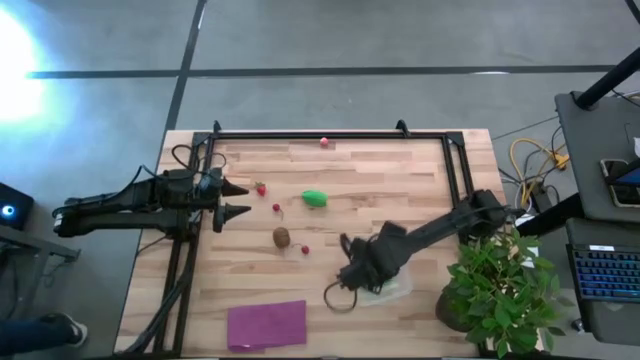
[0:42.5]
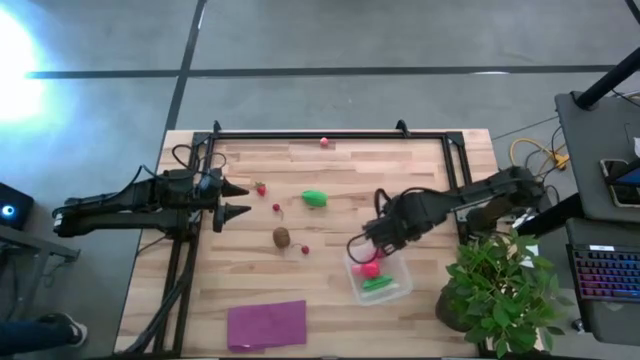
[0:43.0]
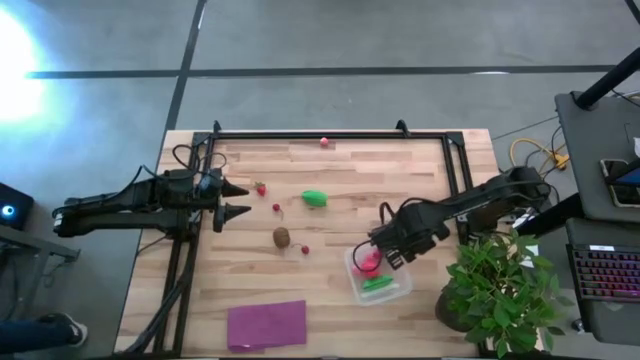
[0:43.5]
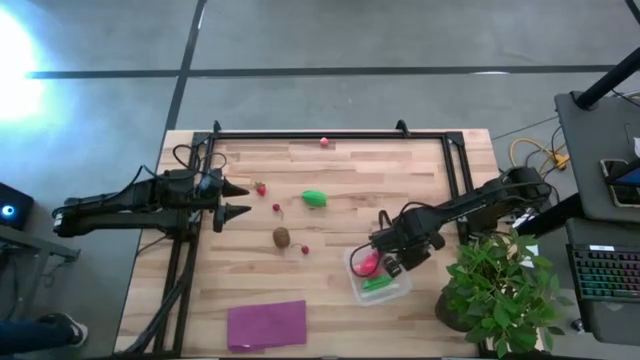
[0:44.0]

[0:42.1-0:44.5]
Task: Pick and placing Produce into tupperware
Adjust the transparent container on the table

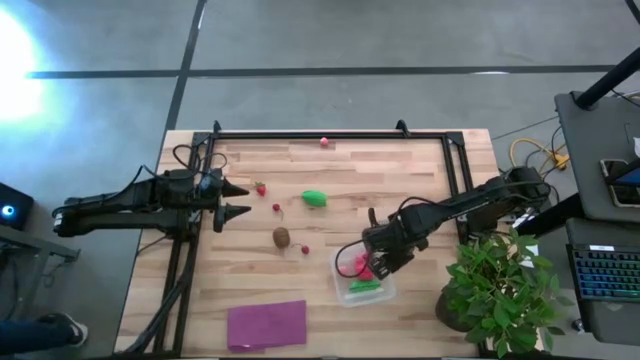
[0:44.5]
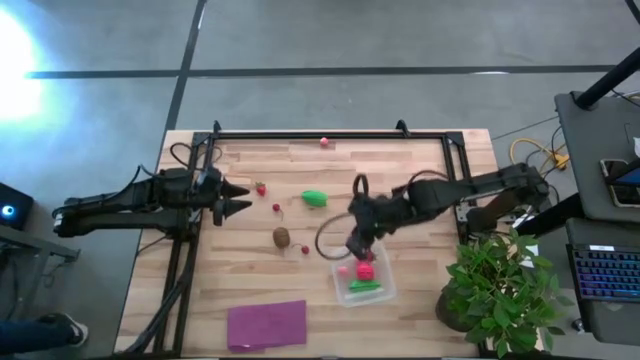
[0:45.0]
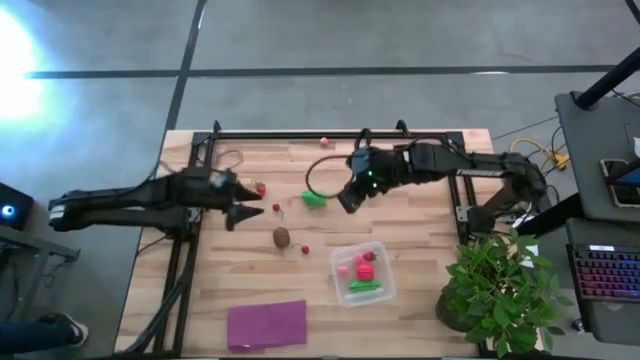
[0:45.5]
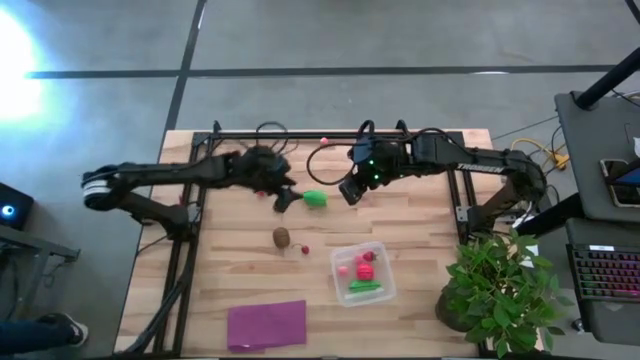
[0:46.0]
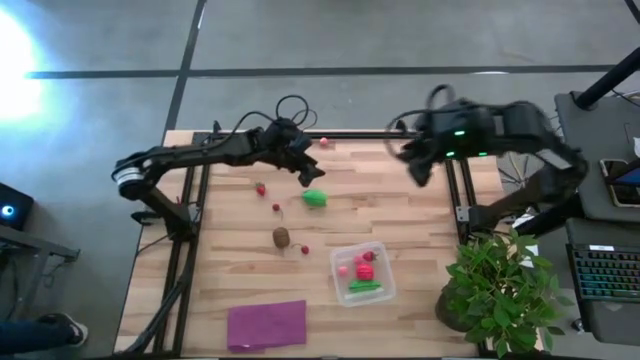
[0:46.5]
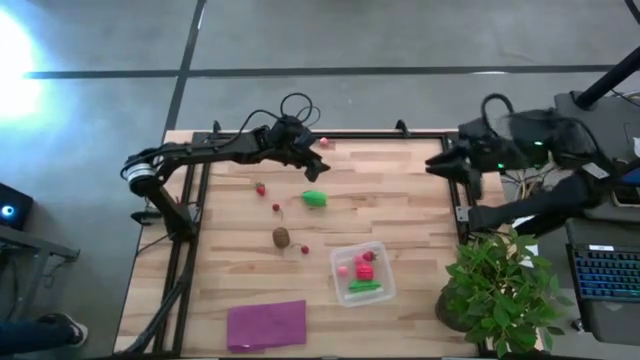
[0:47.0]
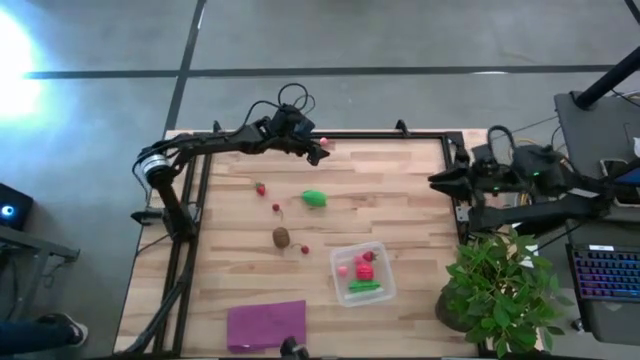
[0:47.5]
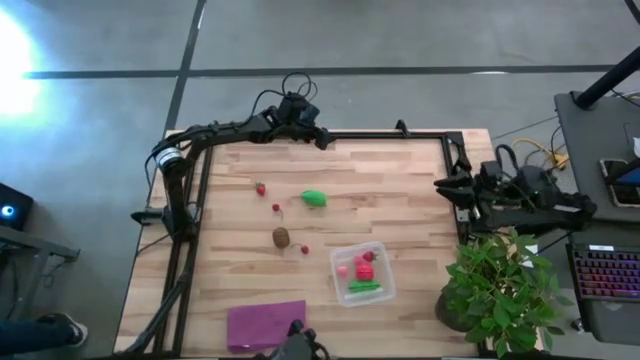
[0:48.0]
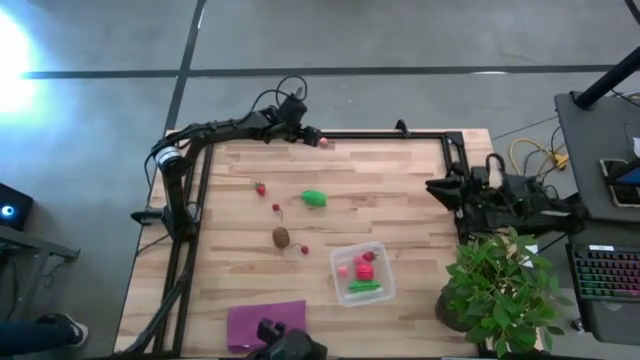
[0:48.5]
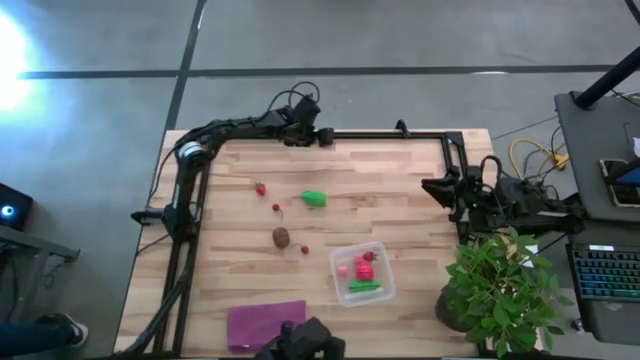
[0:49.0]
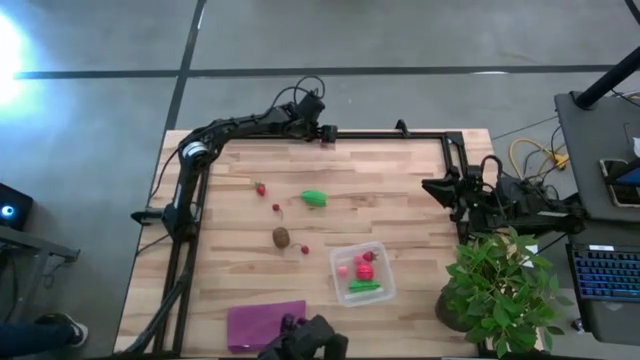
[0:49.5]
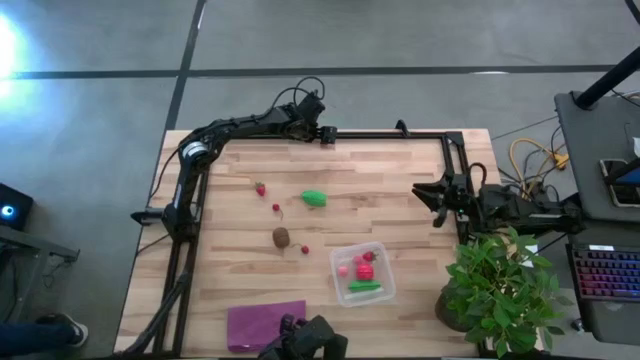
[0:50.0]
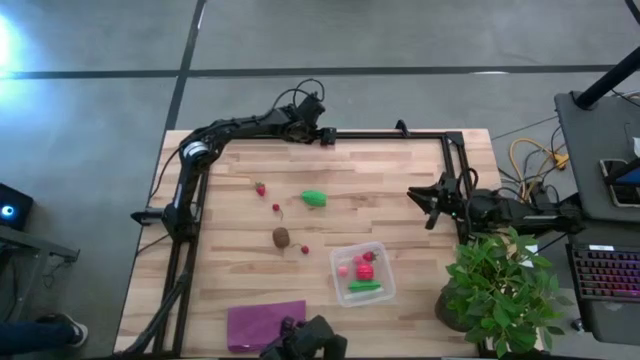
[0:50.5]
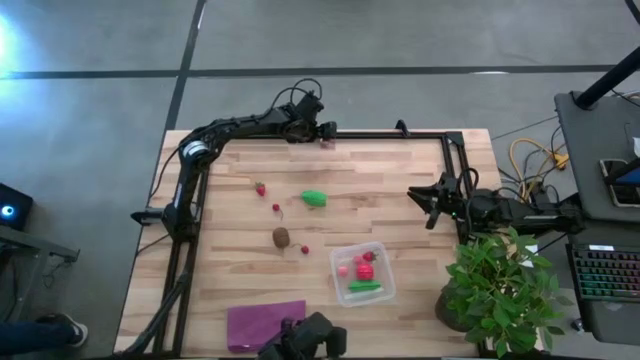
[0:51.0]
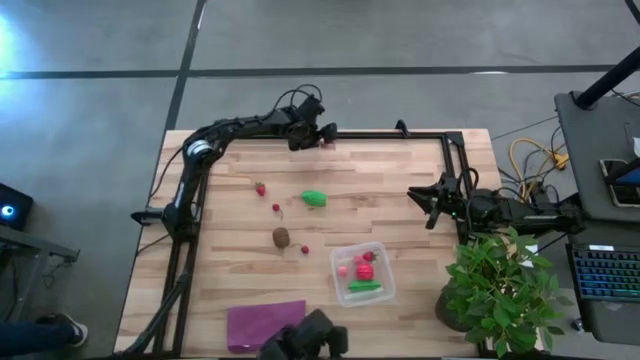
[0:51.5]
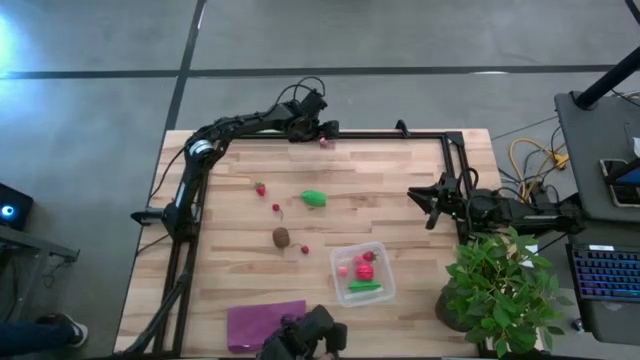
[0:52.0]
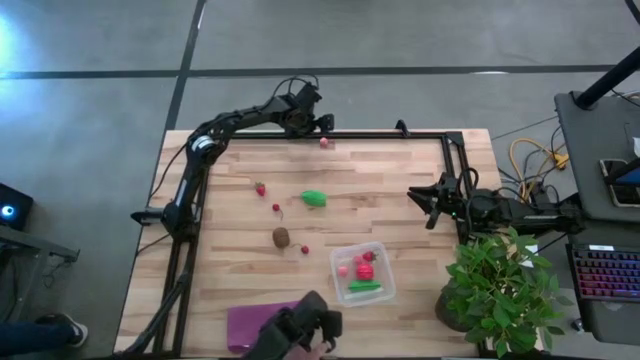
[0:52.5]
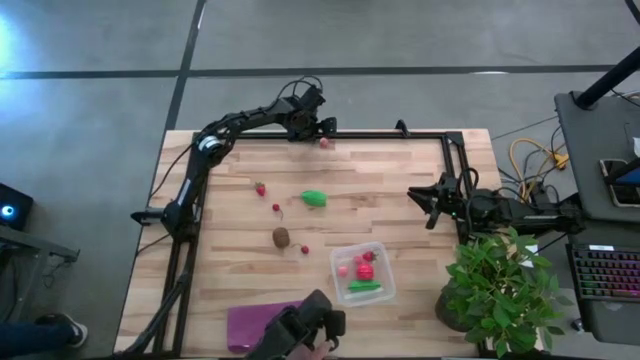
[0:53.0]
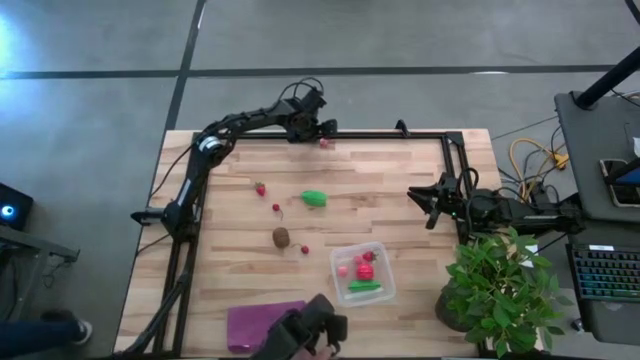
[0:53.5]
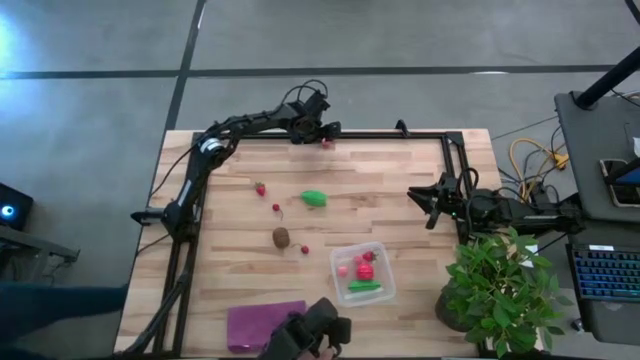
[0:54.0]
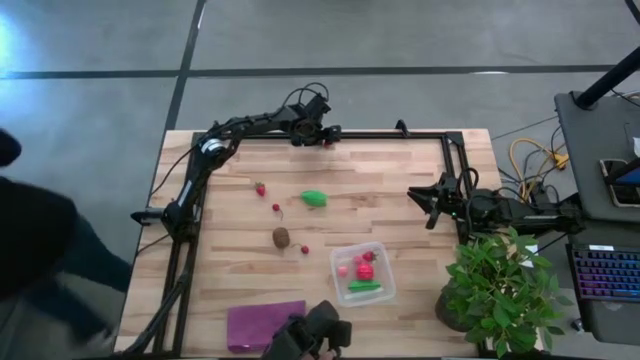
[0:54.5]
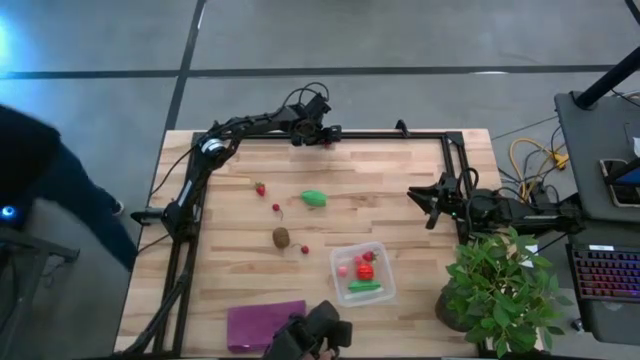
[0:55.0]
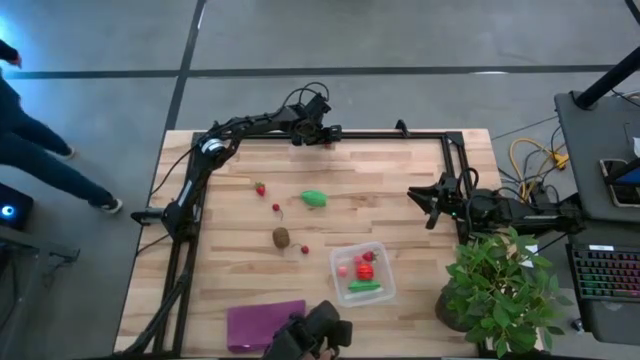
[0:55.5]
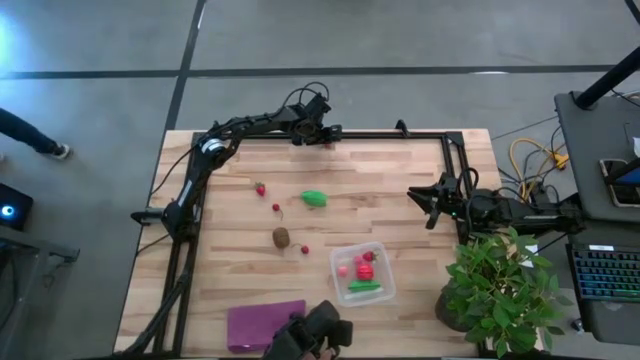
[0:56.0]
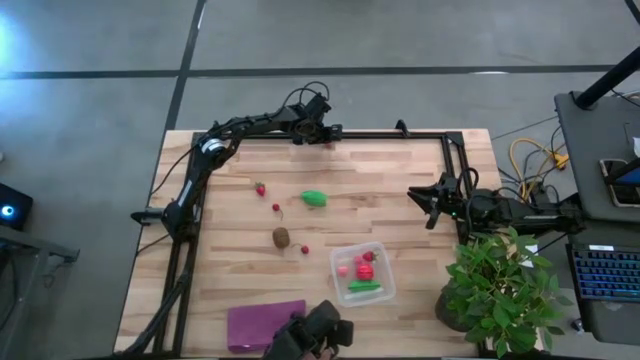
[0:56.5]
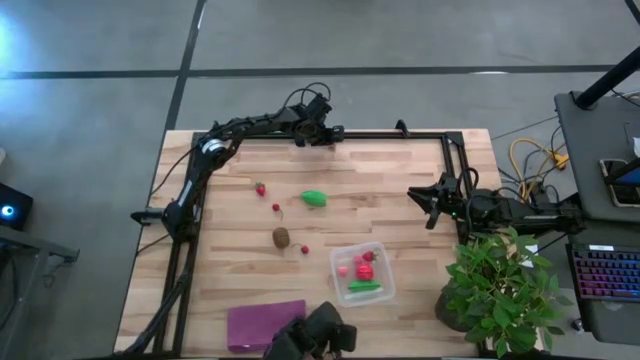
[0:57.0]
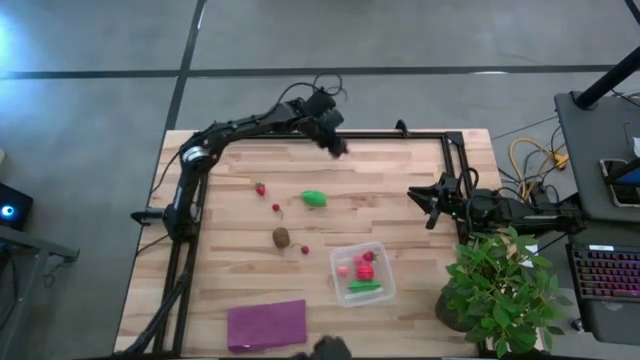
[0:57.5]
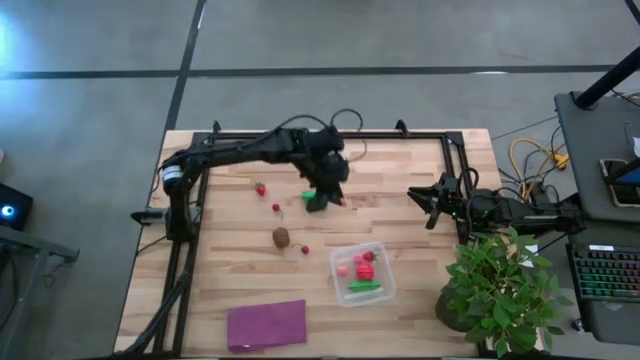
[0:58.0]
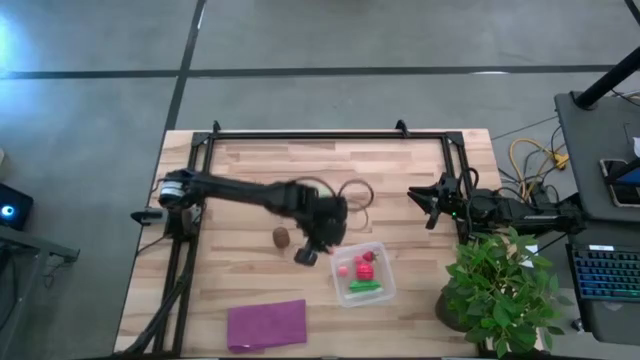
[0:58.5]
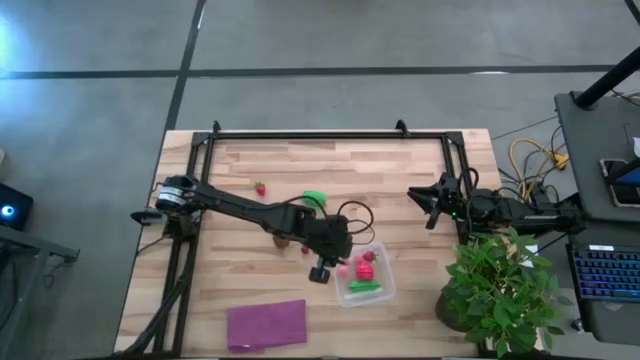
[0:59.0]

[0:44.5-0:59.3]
Put the pink peach into the transparent container

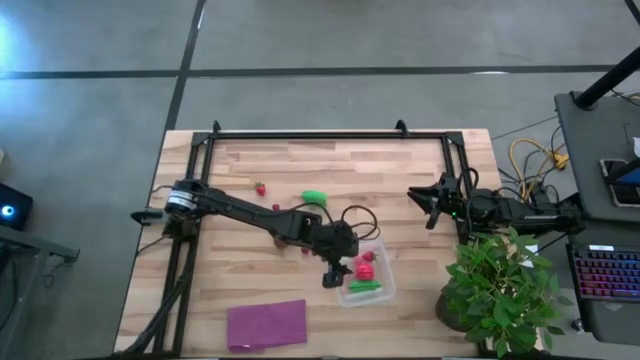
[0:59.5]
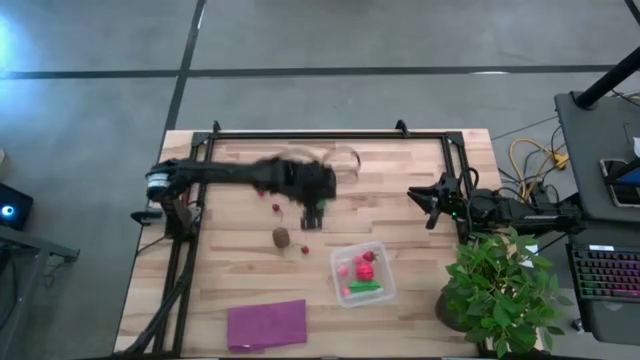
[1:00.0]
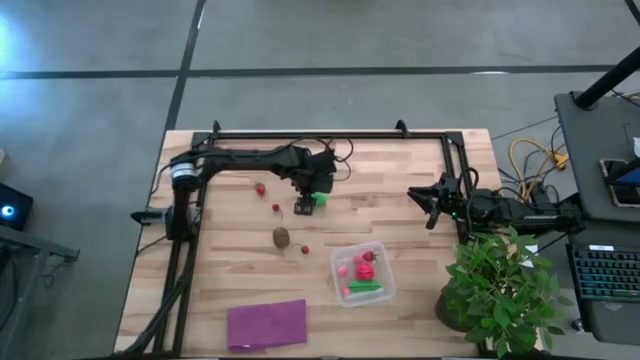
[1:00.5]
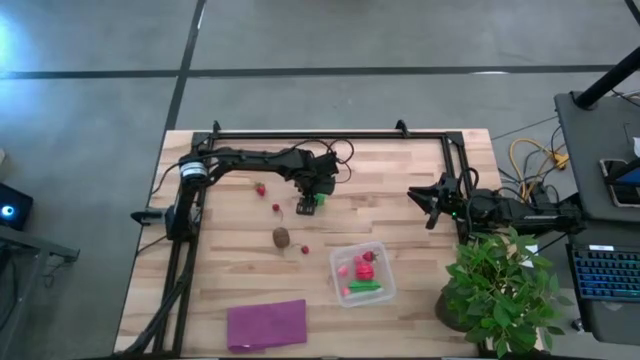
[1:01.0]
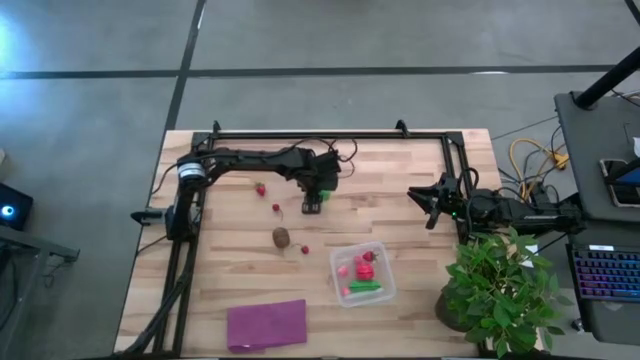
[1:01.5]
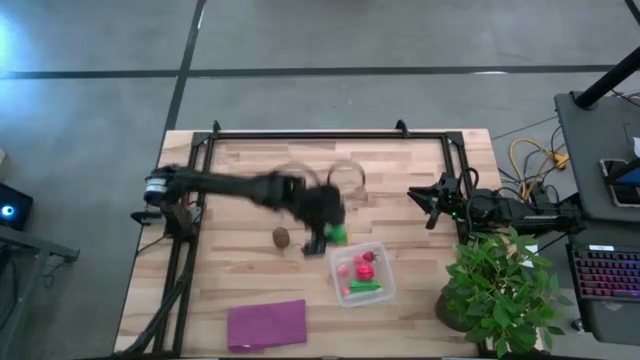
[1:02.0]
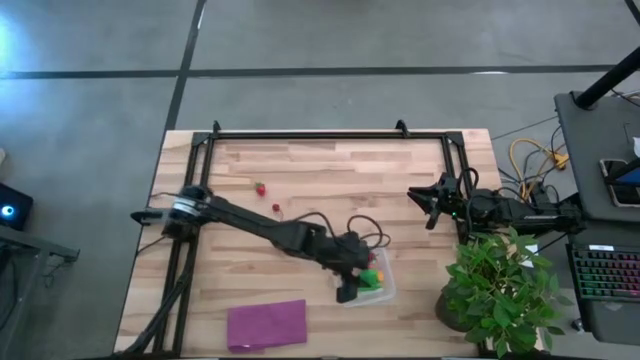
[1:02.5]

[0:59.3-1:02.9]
Put the green corn into the transparent container

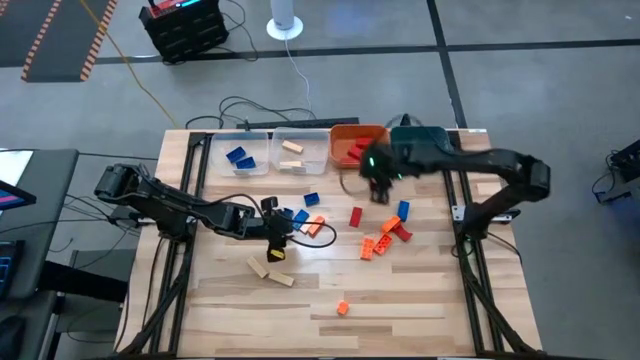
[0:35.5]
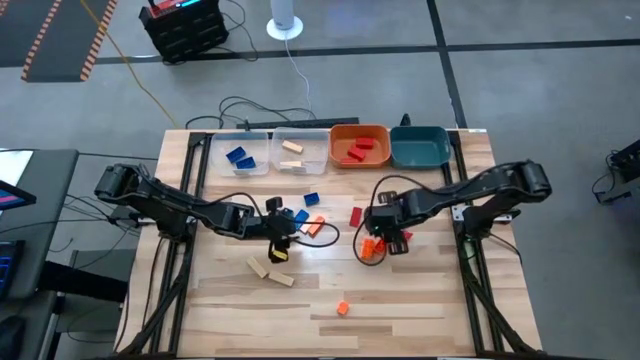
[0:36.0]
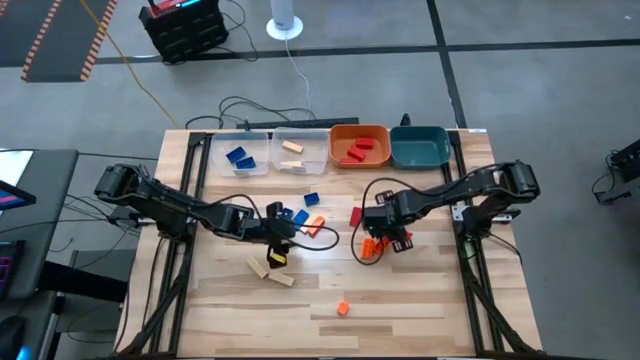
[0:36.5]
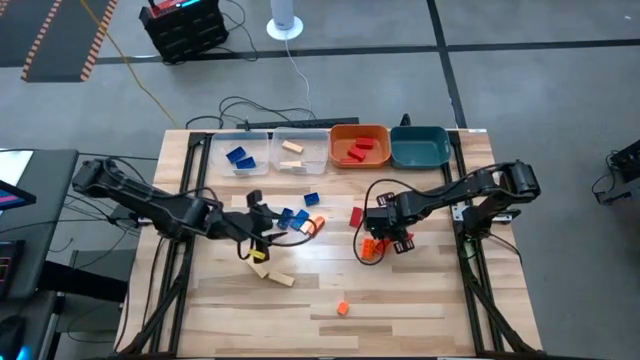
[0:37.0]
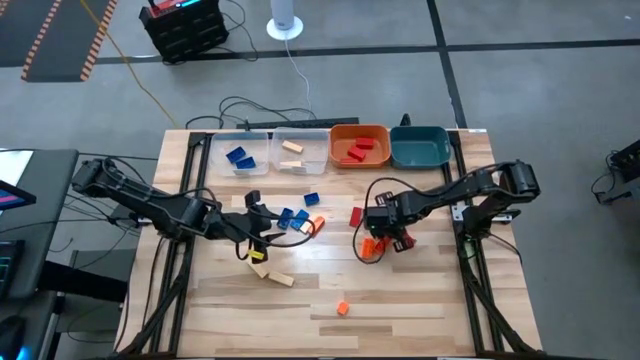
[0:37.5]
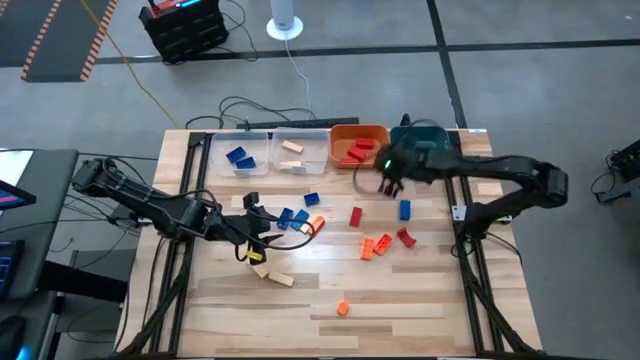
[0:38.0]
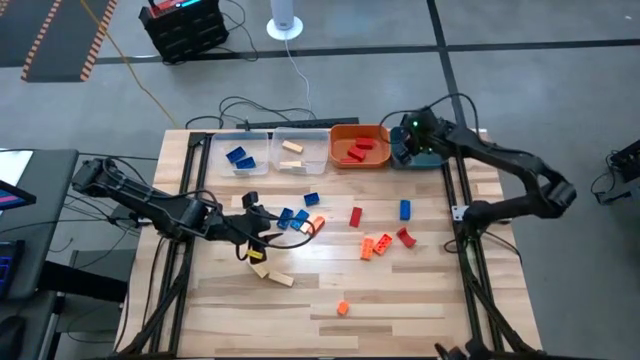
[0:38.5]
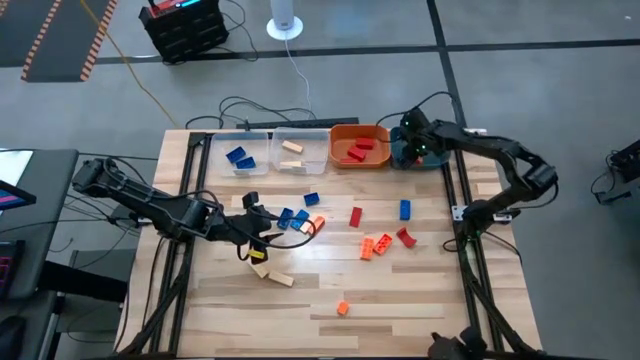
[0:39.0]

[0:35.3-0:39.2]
Task: Sort blocks
Put the orange game piece into the blue bin
